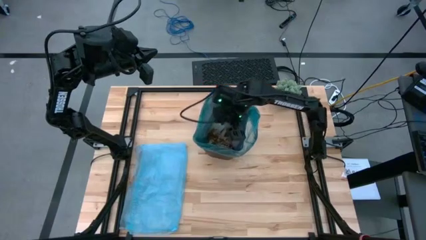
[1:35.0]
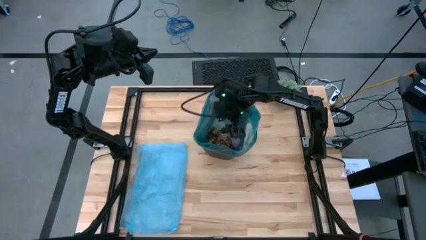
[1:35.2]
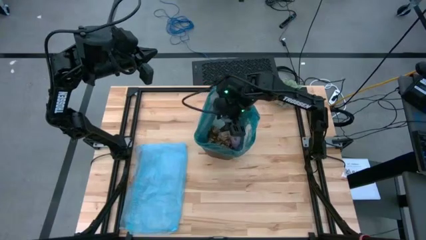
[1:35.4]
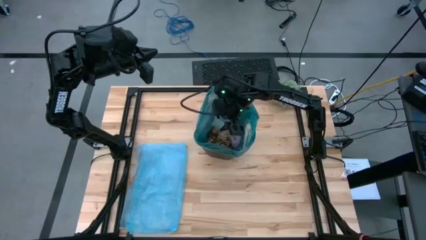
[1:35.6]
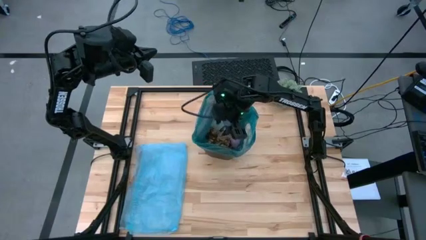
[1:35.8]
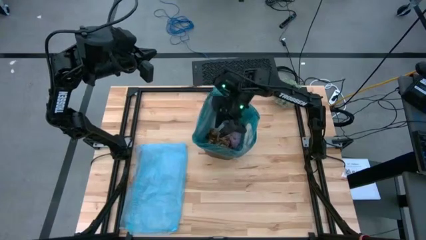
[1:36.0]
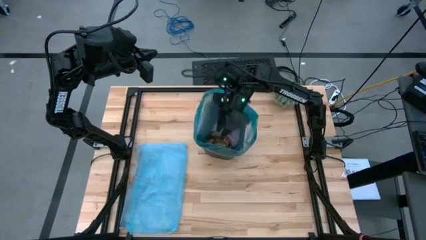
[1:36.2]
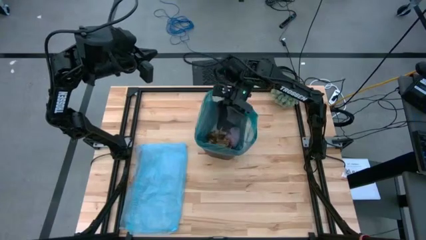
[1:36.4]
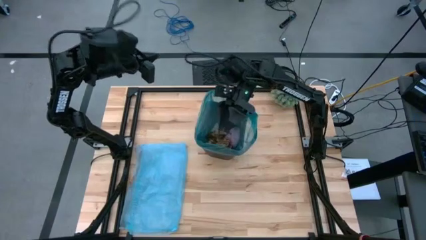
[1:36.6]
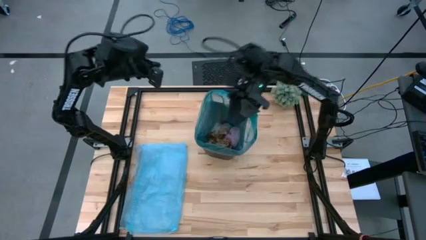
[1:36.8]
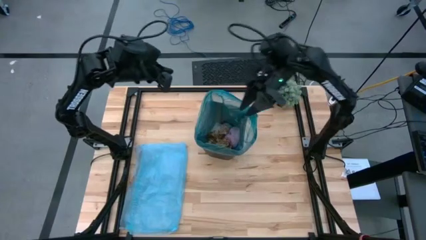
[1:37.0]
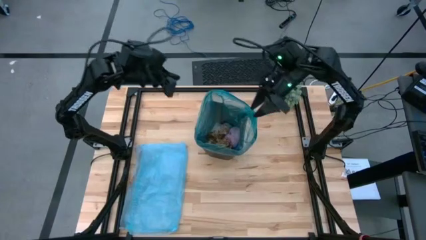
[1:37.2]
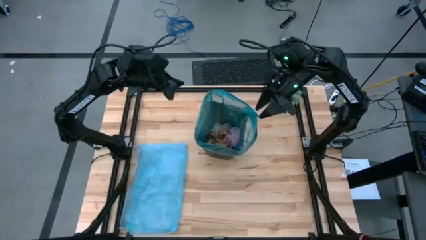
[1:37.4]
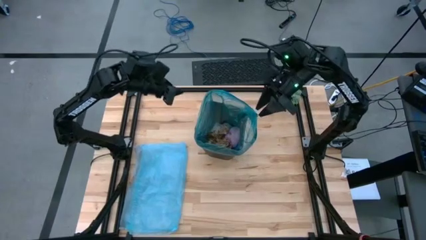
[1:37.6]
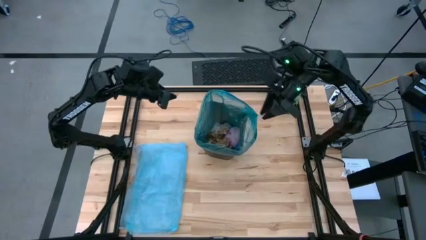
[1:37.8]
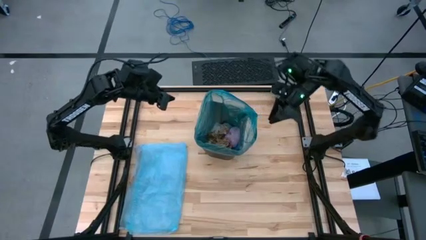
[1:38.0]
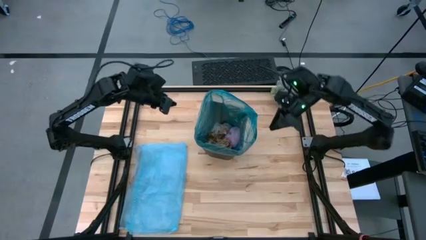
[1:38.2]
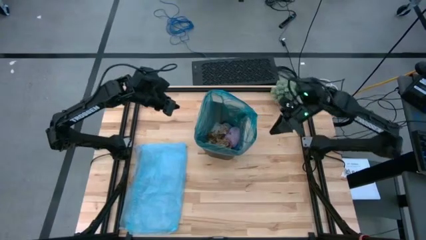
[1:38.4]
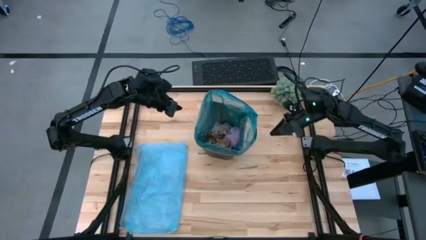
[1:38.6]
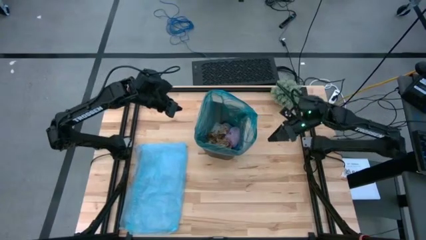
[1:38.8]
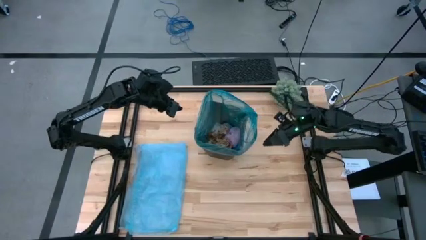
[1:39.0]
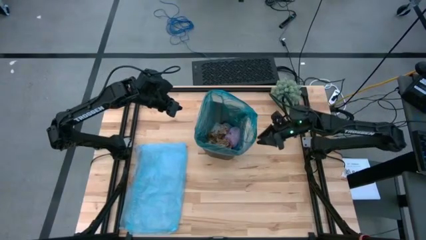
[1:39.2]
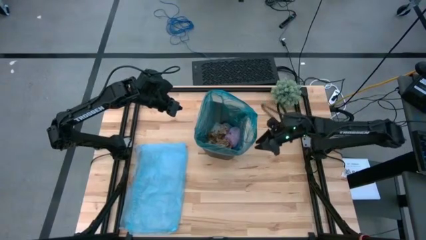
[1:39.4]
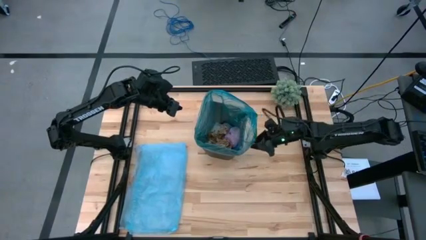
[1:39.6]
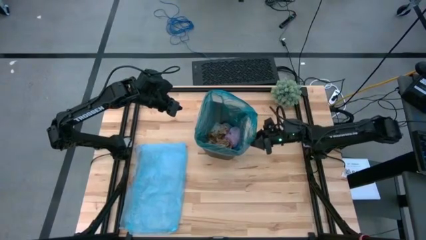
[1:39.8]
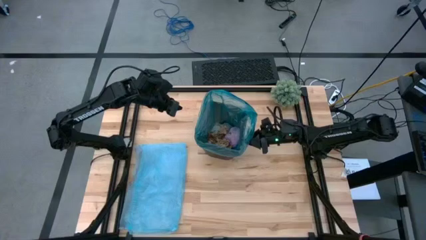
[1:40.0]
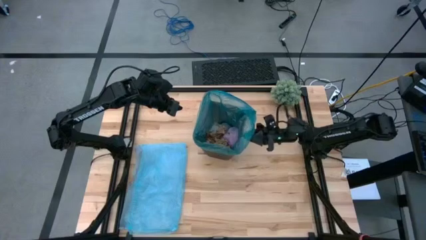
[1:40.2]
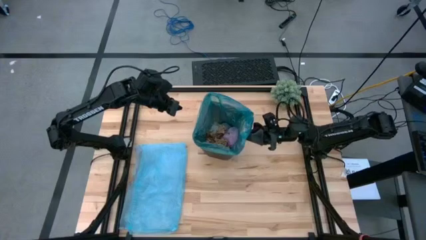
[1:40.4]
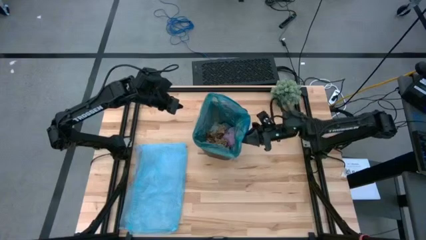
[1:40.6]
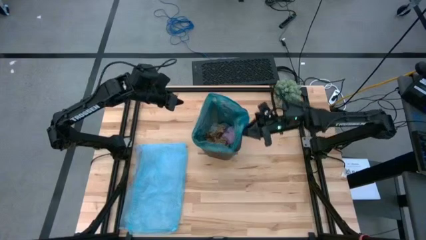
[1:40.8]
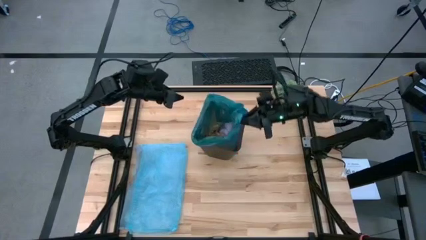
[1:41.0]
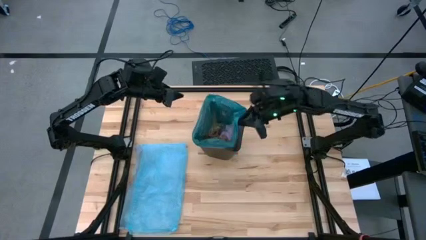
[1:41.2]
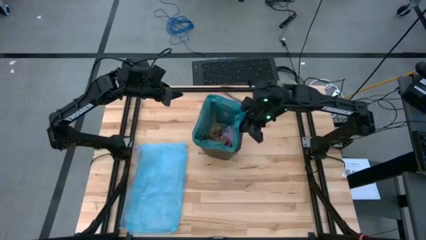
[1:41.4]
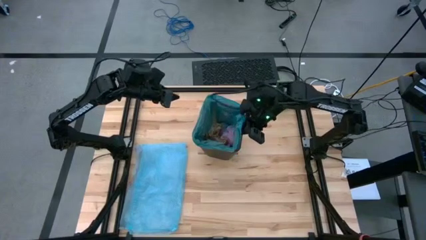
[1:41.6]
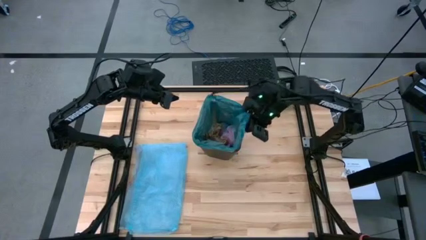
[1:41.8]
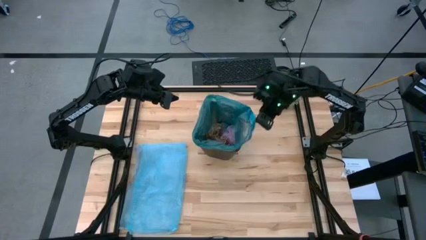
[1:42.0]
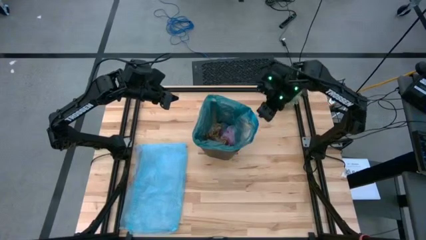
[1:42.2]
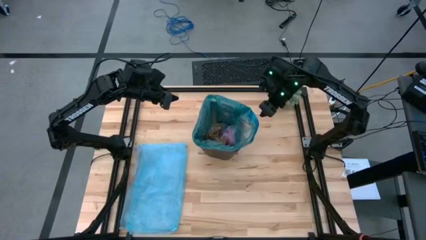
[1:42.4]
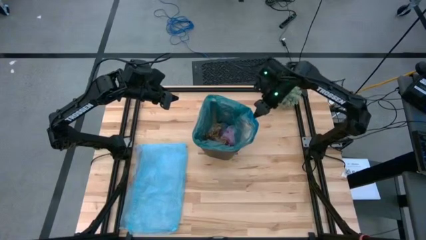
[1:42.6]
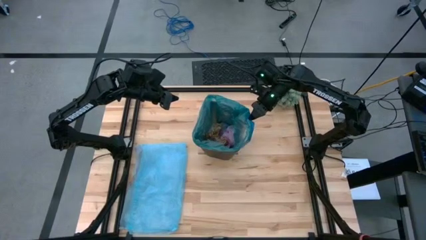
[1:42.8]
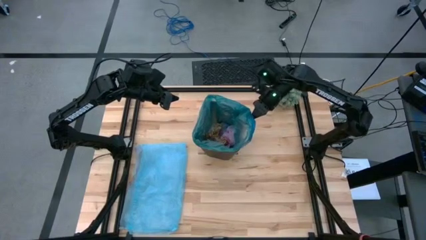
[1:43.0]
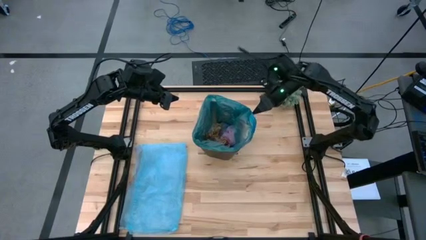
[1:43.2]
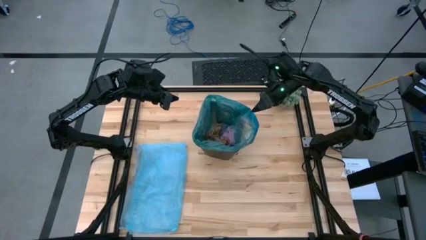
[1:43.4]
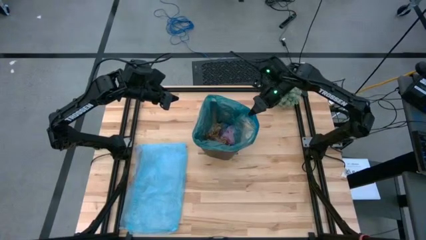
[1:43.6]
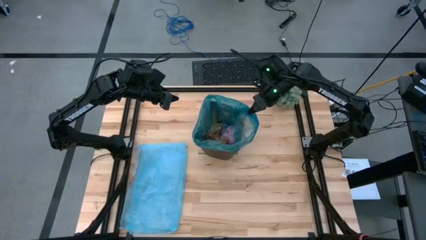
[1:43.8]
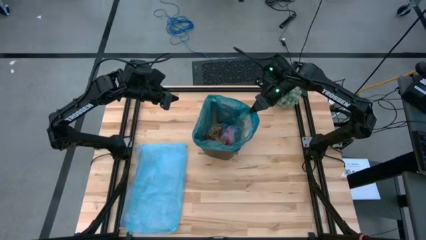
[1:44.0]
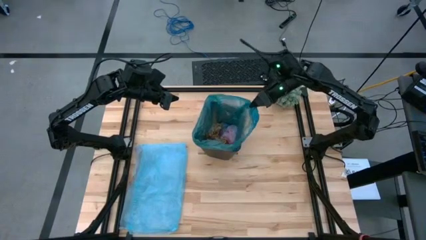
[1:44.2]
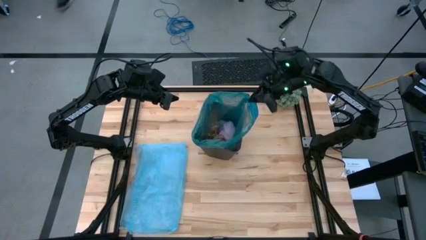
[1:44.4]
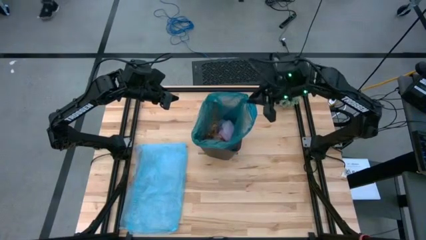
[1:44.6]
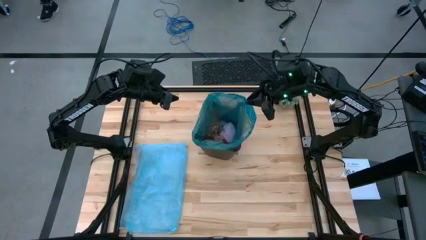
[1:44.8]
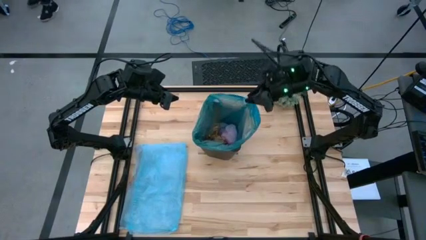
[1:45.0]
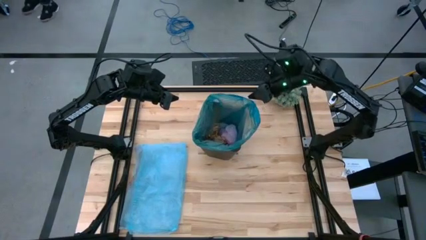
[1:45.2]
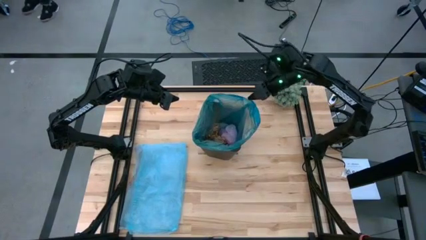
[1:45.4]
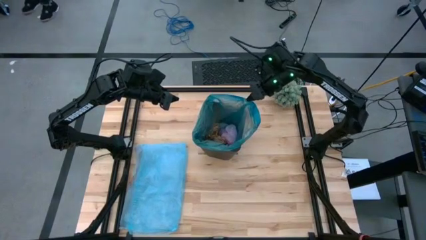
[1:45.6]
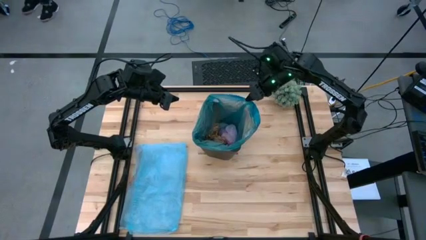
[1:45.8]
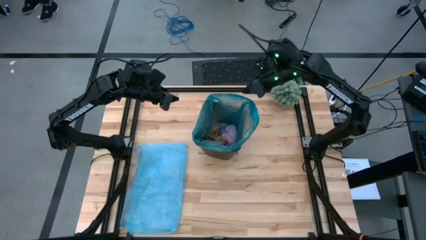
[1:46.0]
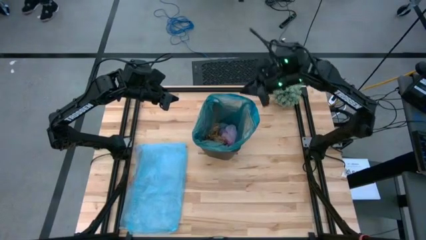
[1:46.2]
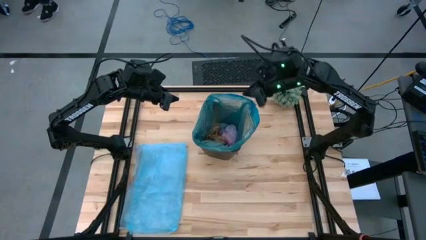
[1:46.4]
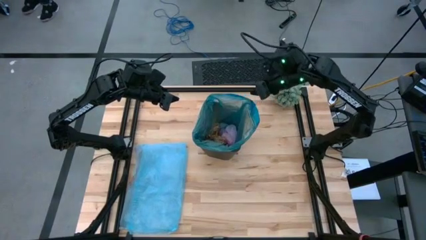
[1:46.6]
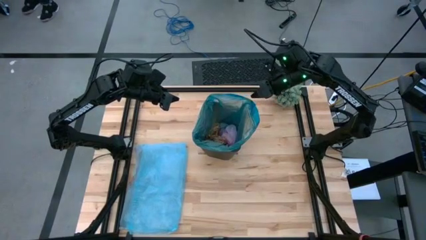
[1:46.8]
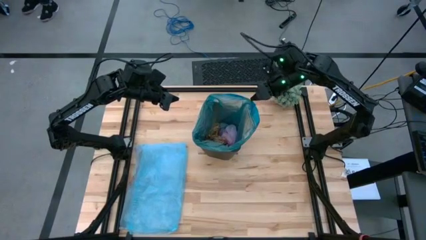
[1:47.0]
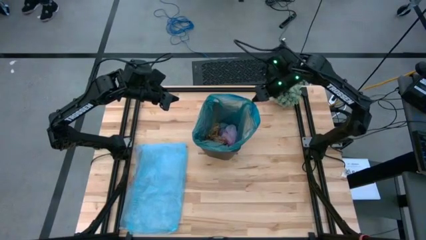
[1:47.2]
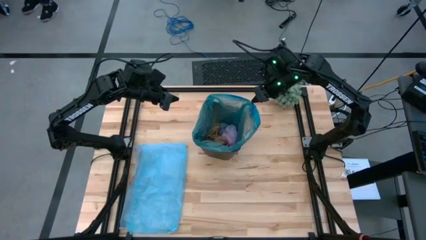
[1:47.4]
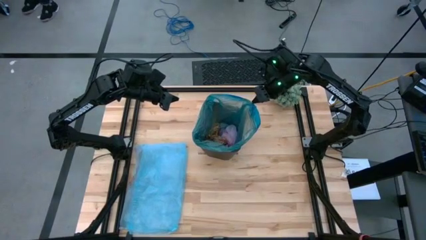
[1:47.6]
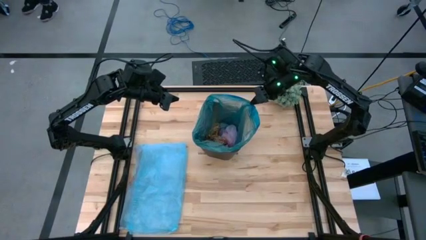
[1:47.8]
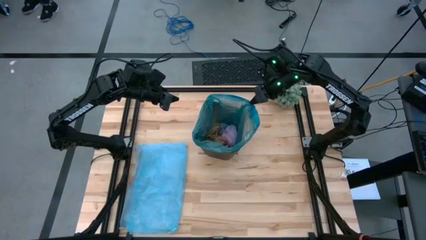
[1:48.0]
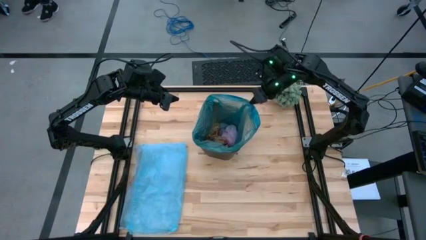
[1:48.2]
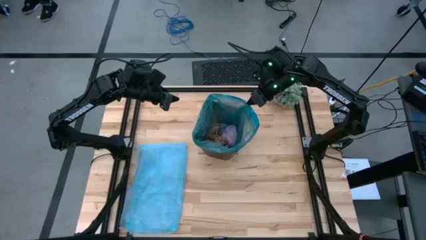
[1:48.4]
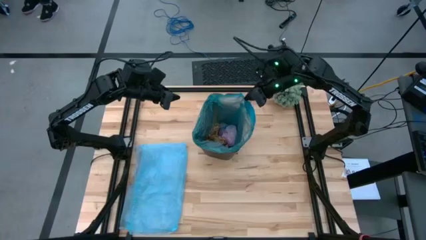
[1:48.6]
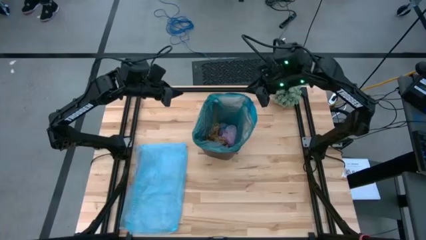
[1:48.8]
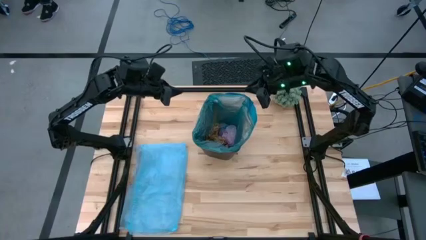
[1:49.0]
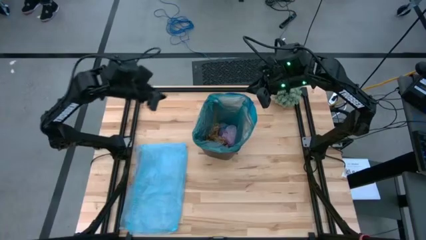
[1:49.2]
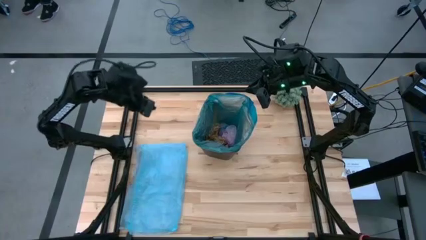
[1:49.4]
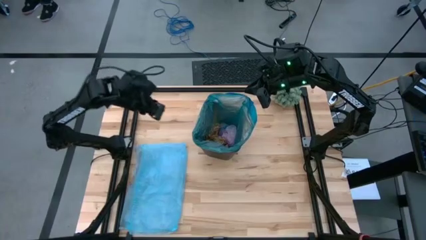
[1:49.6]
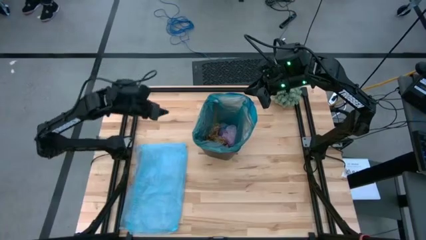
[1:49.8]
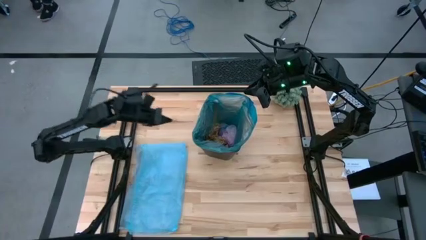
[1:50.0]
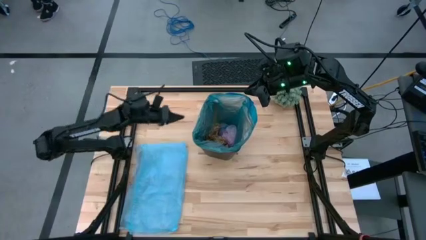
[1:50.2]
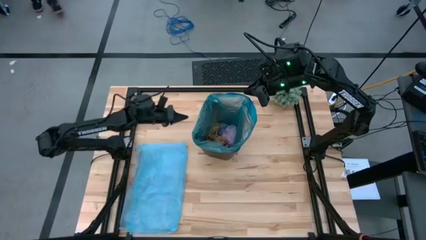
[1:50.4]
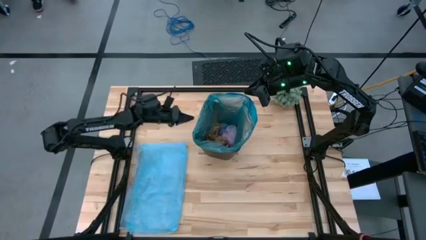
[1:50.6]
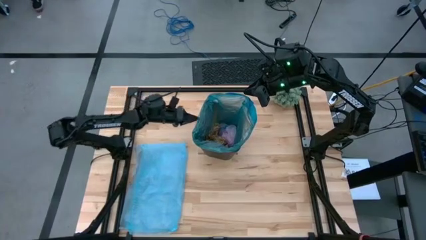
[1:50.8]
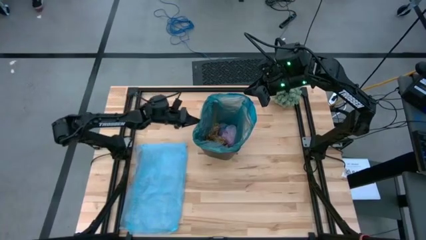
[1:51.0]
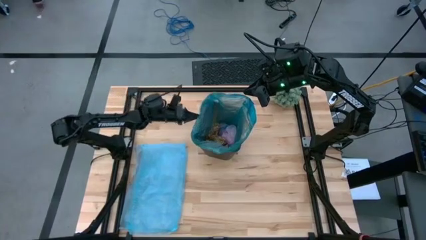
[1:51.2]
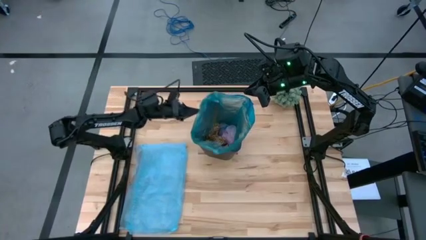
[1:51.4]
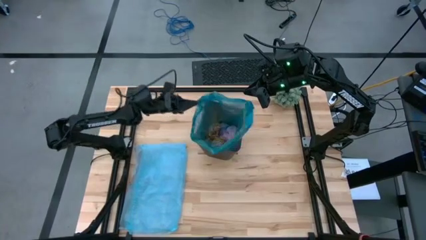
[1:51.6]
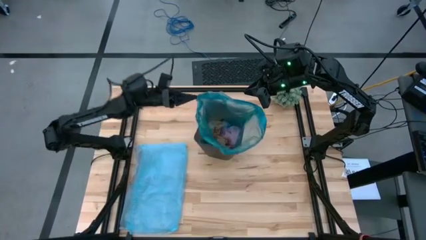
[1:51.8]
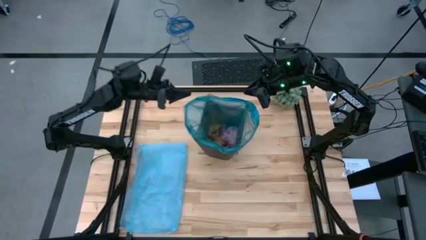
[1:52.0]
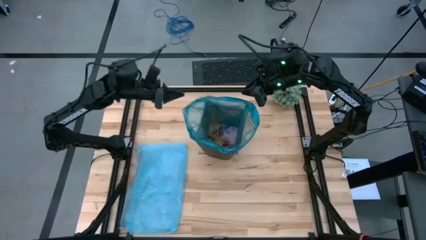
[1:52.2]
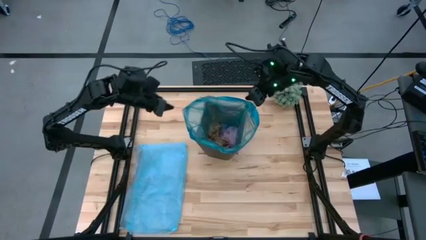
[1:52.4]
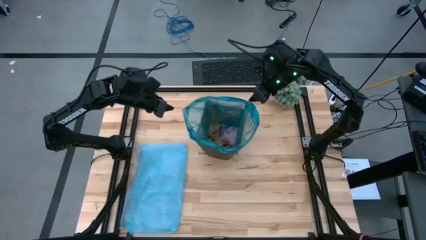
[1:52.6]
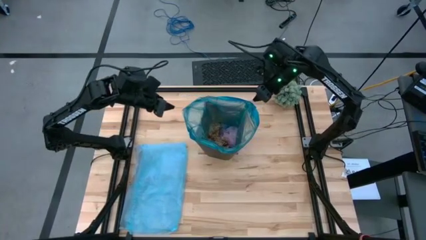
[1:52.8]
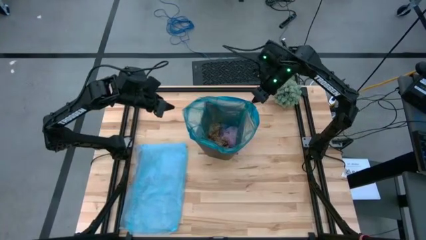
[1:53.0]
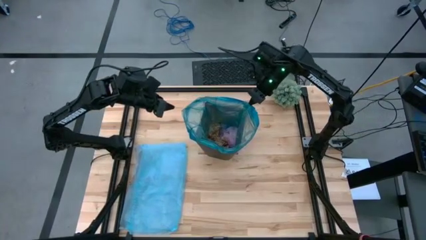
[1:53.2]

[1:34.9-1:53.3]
Task: place trash/remove bag and relplace
Remove the trash bag from the trash bin
